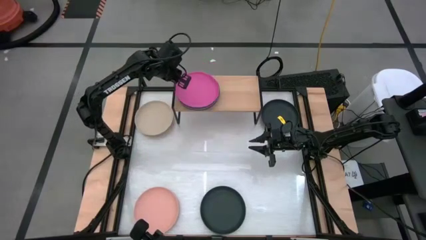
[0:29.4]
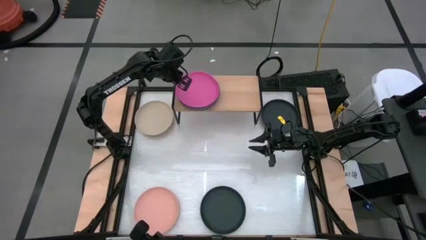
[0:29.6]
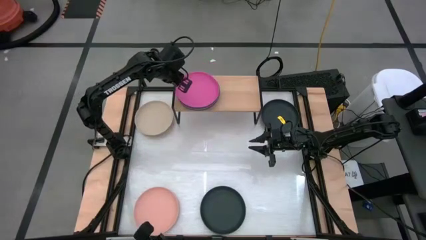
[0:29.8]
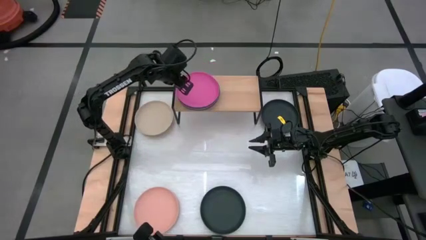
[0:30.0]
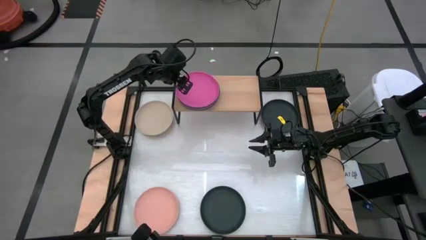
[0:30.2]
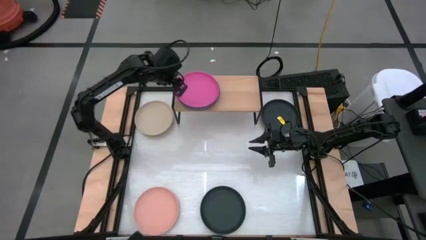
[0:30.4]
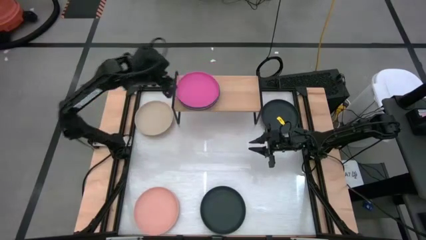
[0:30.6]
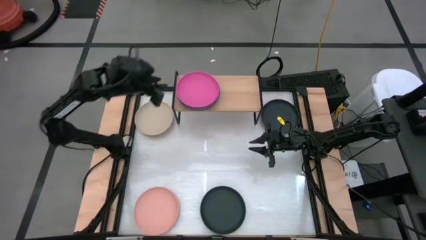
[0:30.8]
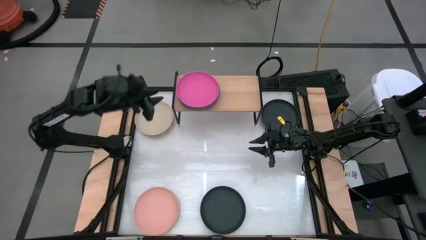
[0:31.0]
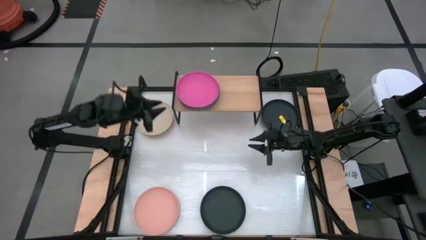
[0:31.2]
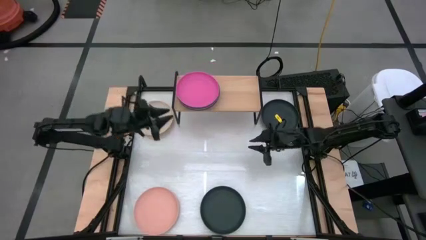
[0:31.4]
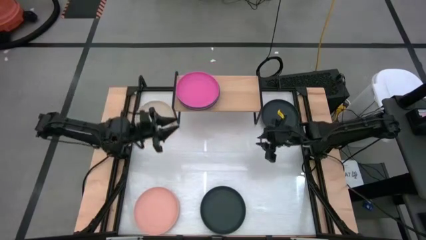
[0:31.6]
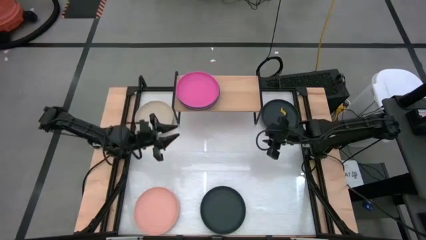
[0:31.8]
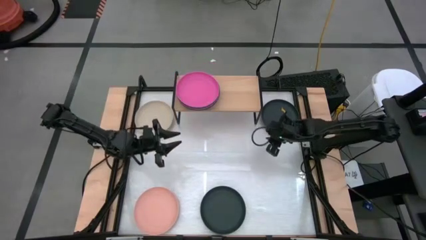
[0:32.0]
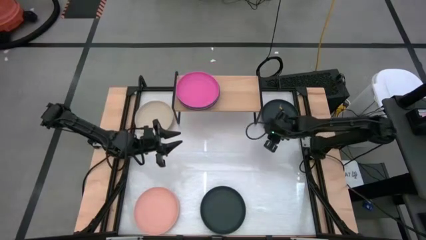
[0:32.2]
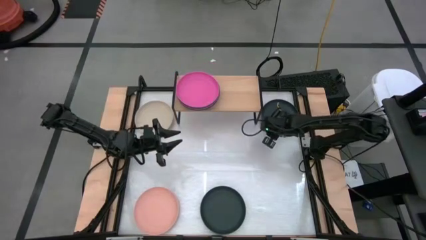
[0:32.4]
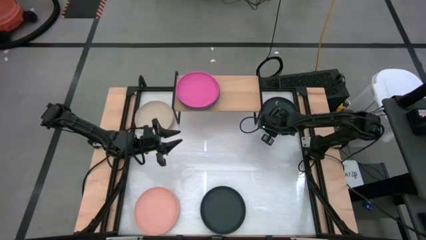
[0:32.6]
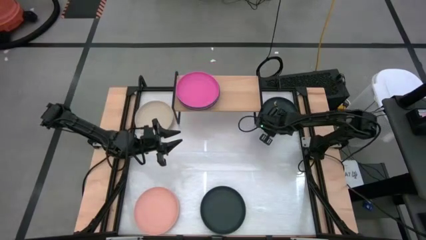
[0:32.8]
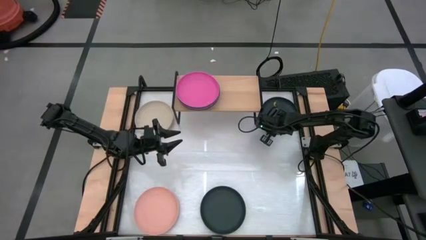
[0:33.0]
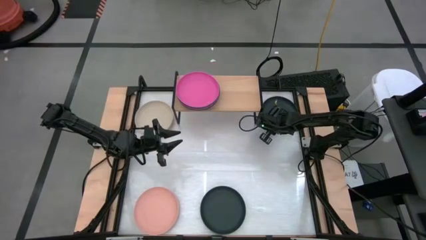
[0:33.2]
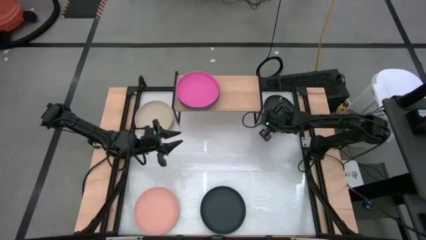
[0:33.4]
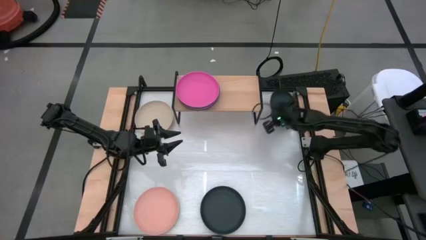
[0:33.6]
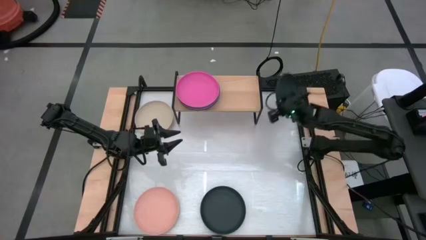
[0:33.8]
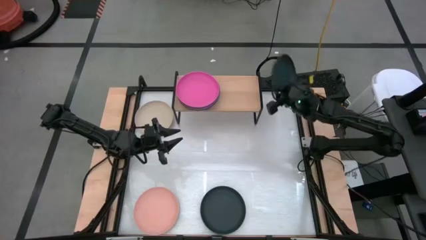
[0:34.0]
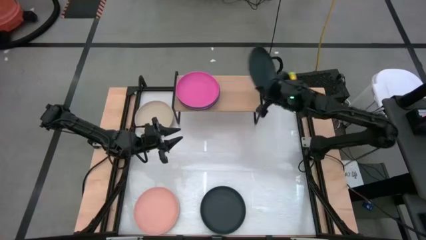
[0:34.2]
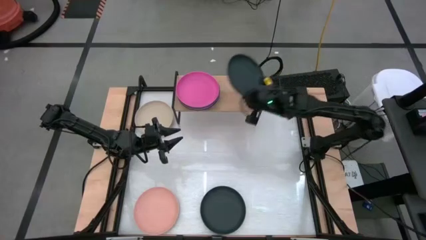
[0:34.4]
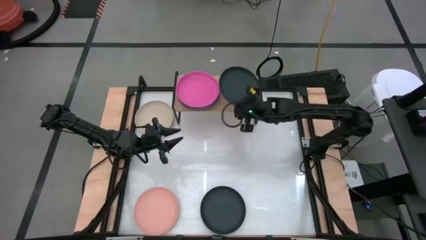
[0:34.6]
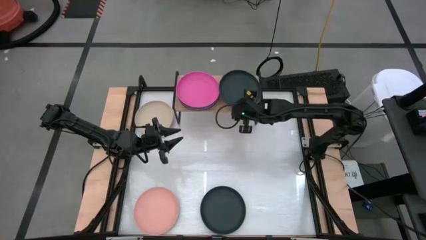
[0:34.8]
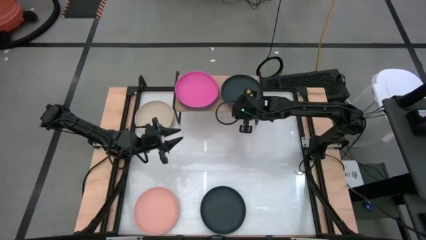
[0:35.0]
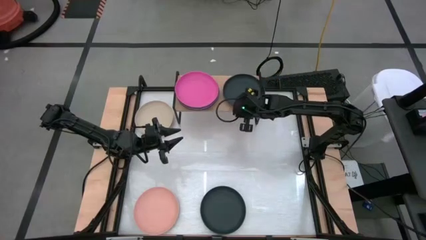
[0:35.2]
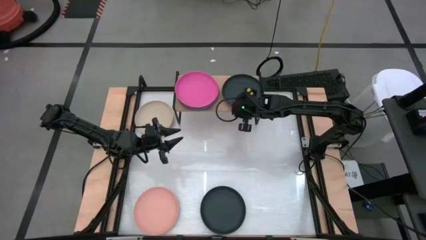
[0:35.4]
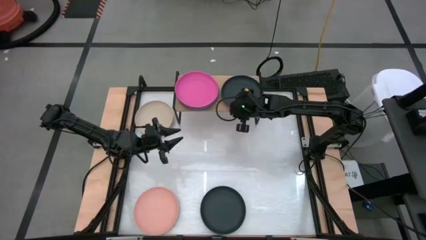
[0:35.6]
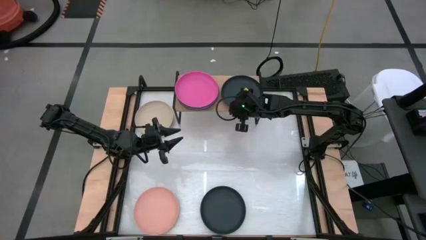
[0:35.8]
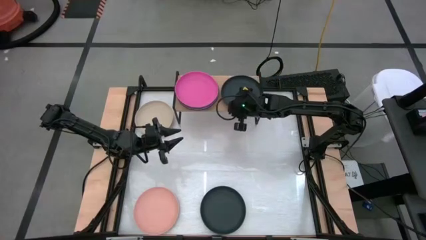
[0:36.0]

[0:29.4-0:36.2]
Task: Place and stack plates onto a shelf
Put the top black plate on the shelf

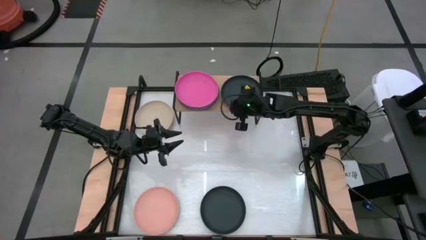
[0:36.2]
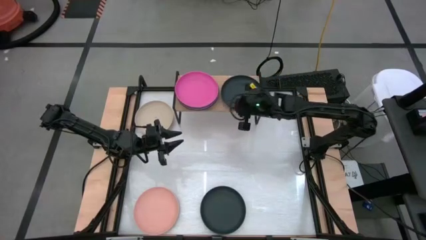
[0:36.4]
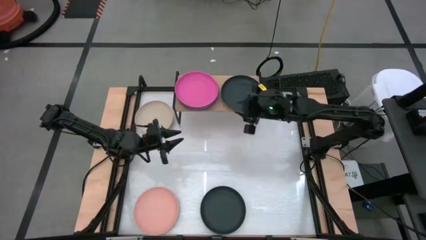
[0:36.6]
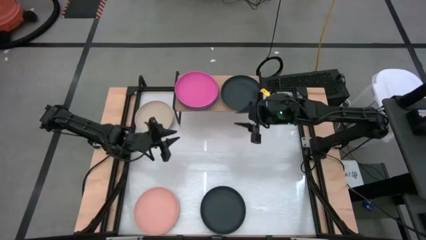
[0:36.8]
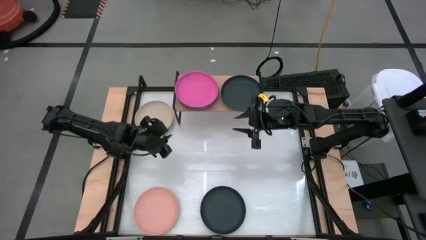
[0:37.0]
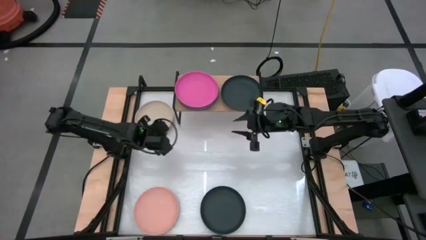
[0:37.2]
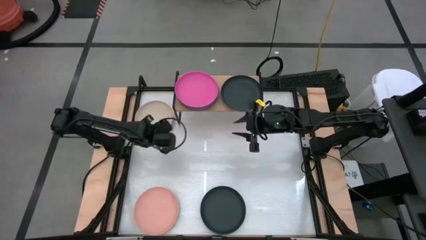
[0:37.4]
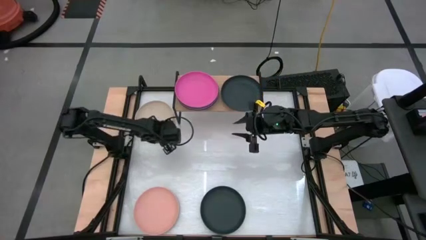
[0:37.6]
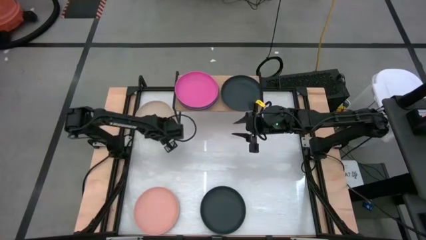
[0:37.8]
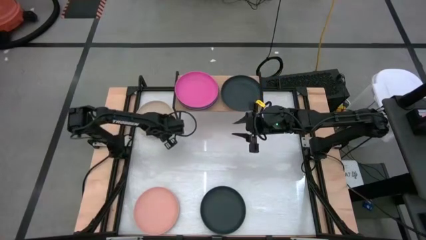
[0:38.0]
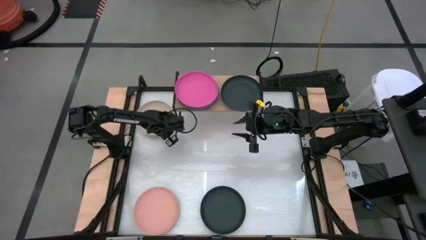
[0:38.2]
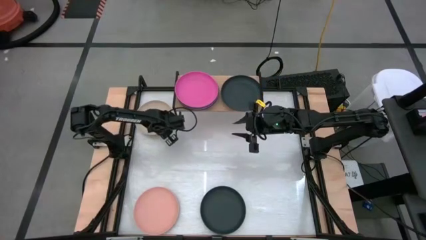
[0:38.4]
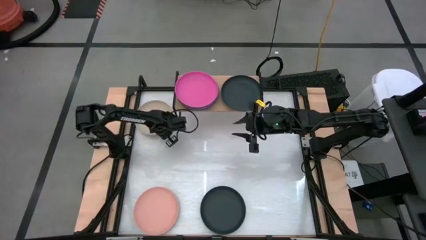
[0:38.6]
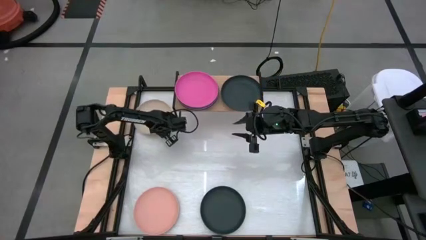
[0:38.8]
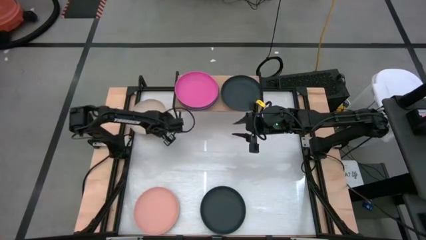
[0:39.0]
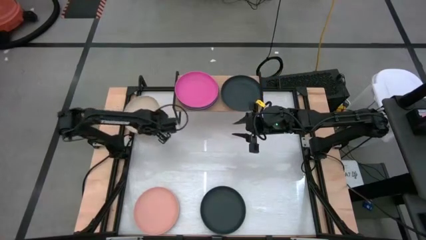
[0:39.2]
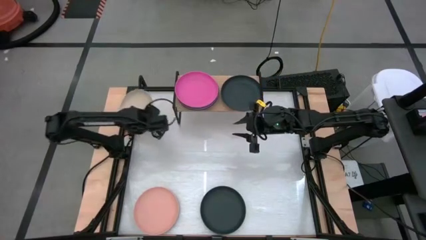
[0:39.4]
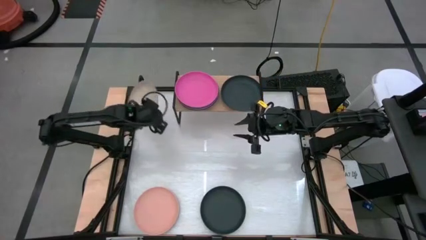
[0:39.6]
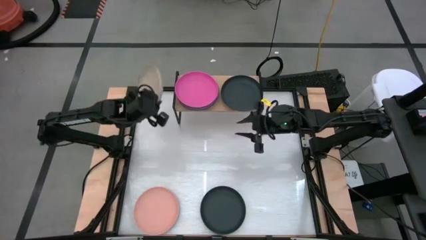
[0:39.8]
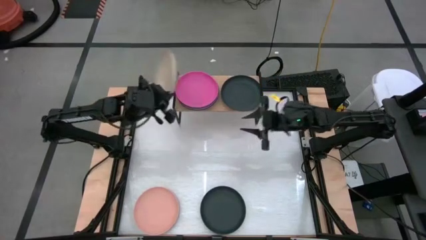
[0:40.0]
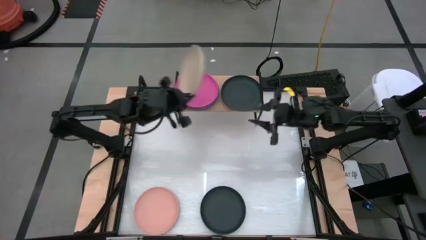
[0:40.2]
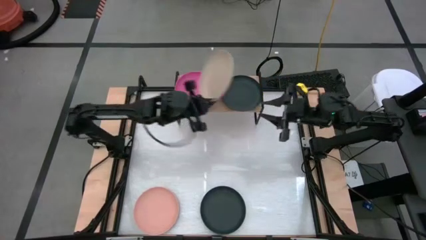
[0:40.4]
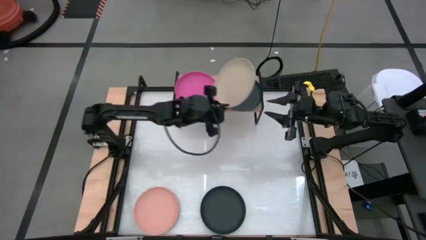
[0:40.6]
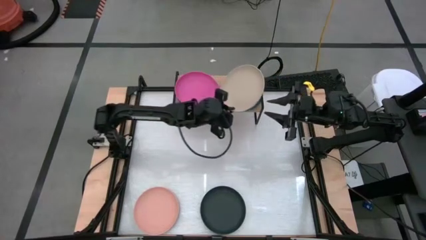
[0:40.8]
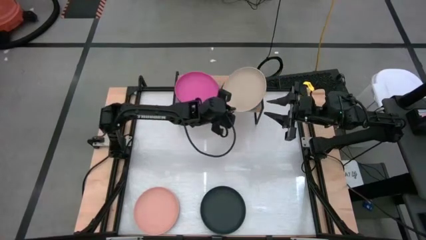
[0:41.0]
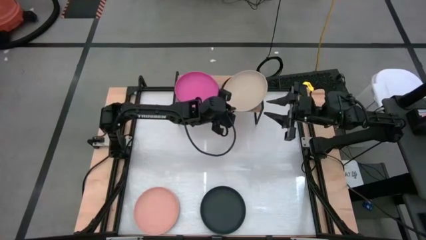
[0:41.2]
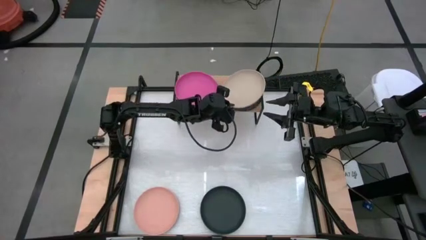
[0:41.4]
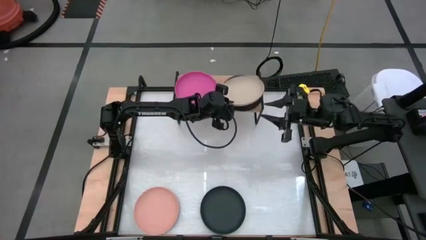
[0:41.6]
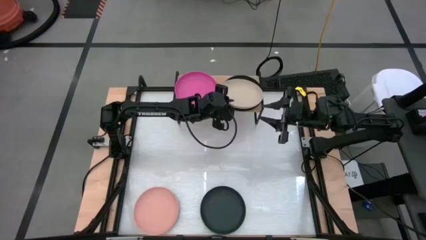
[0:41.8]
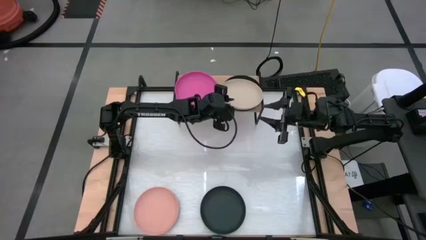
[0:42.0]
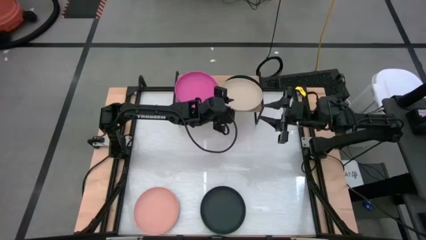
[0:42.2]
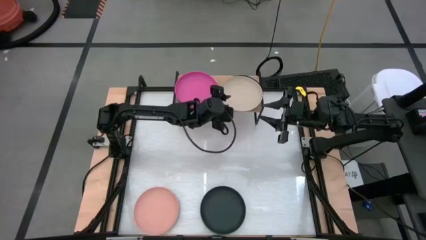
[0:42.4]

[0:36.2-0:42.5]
Stack the brown plate on top of the black plate on the shelf

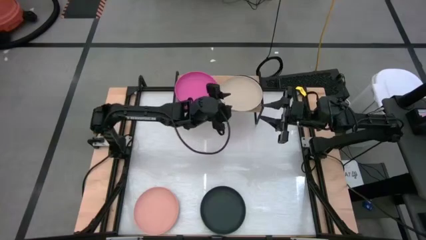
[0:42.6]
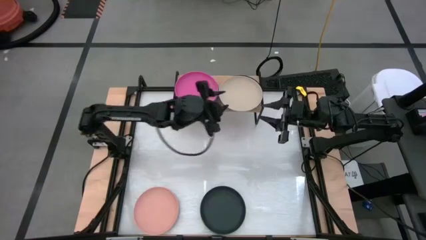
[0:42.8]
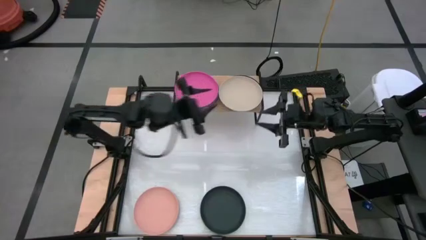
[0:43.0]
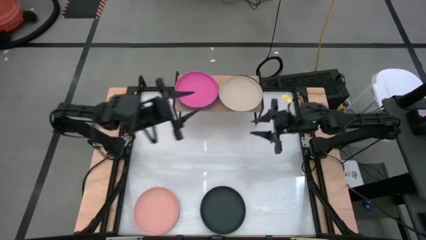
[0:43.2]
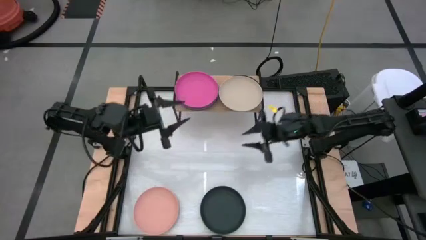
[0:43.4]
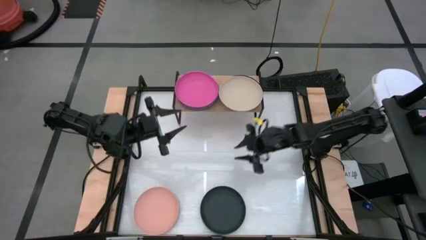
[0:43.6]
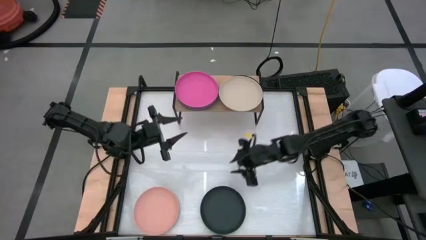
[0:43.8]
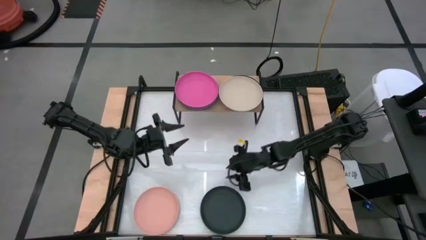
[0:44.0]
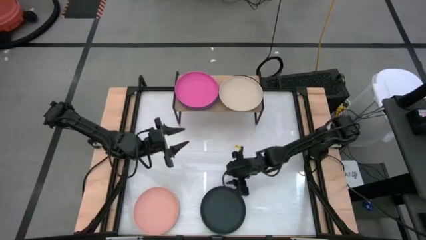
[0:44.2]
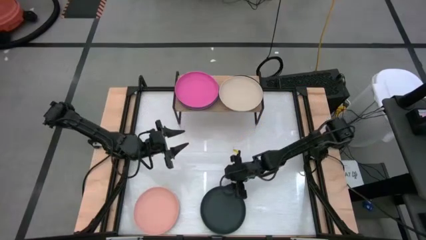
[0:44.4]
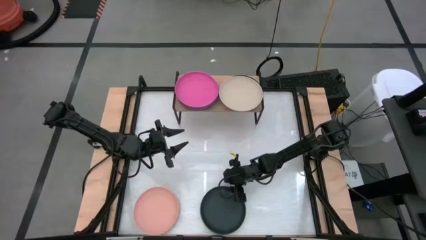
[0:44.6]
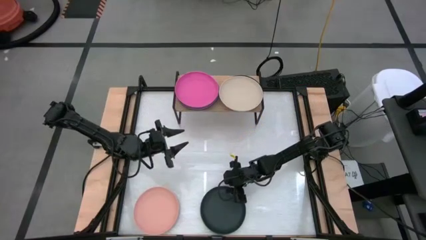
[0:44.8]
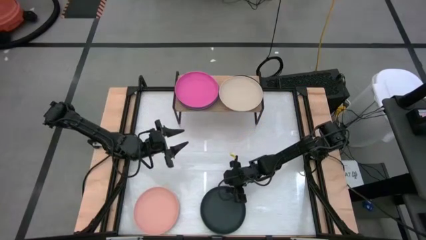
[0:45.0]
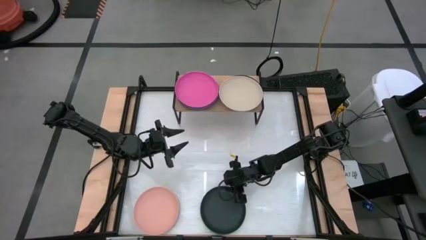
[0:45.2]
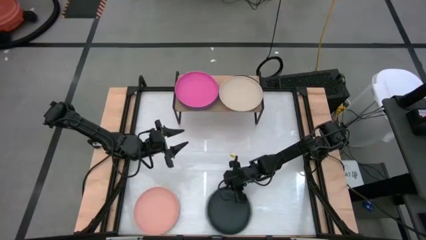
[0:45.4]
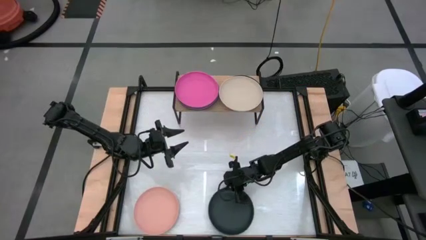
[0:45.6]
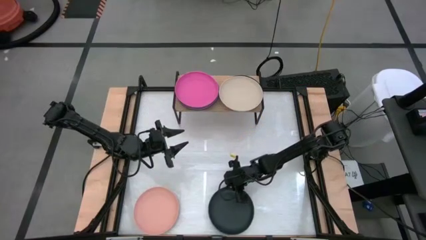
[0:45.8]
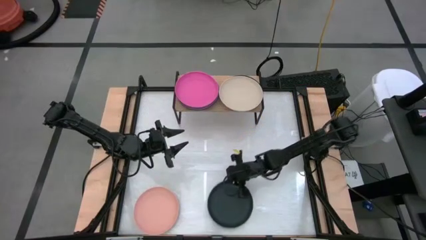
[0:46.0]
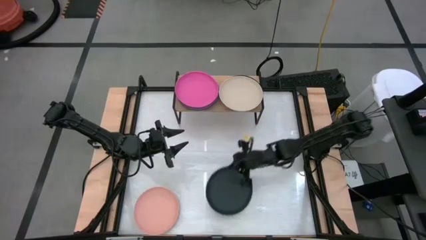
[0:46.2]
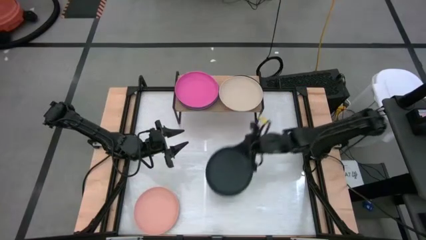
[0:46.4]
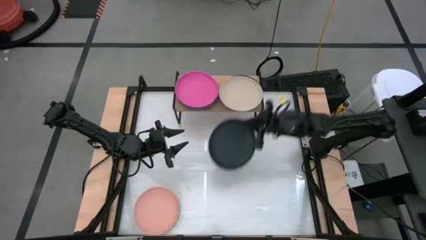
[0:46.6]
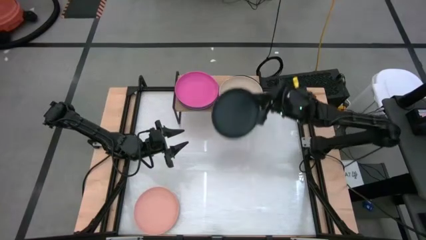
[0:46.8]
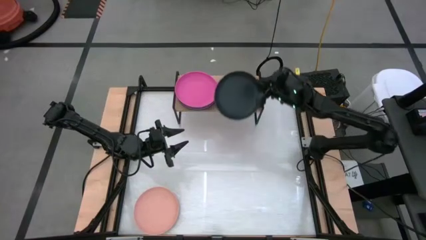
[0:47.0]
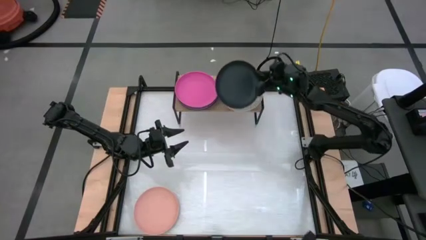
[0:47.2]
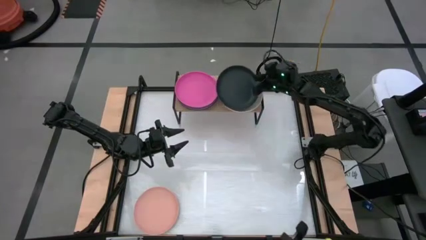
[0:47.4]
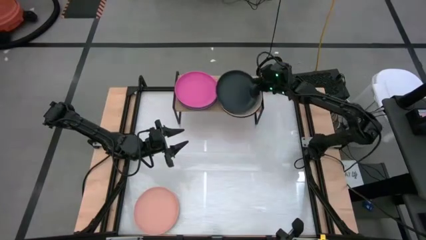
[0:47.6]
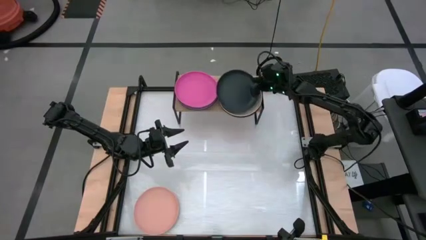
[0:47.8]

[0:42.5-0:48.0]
Stack the black plate on top of the brown plate on the shelf
